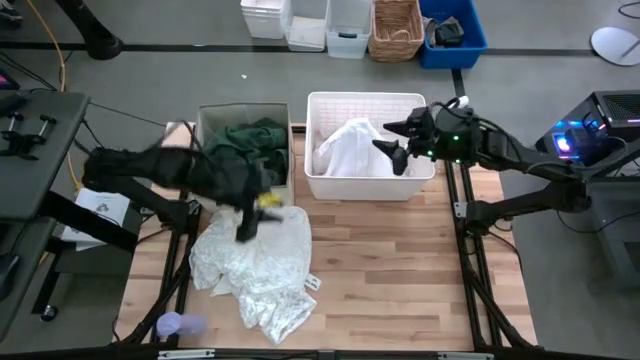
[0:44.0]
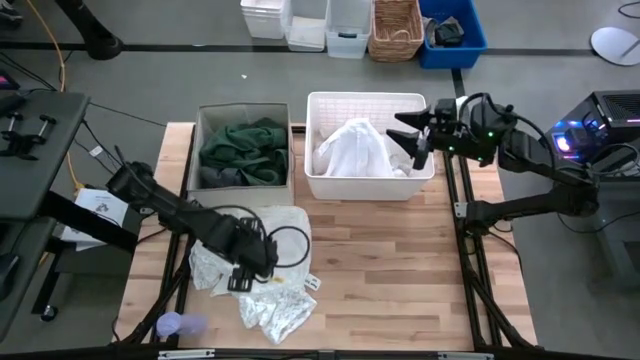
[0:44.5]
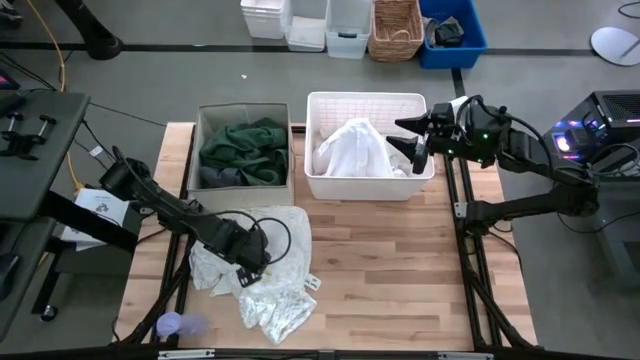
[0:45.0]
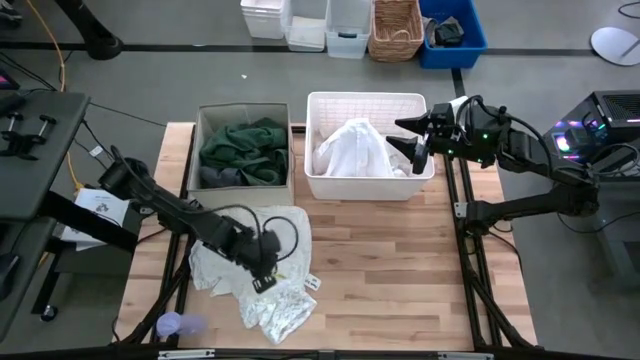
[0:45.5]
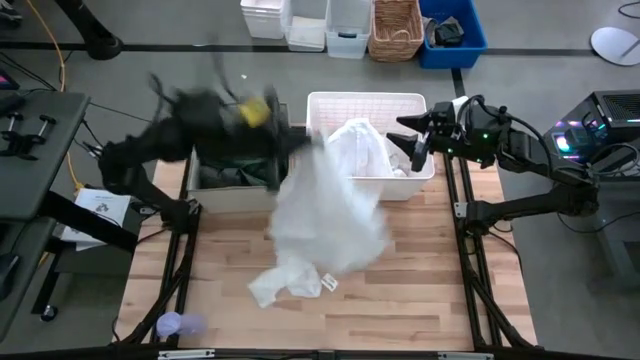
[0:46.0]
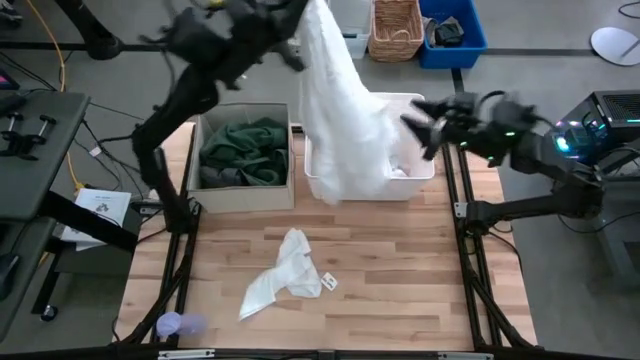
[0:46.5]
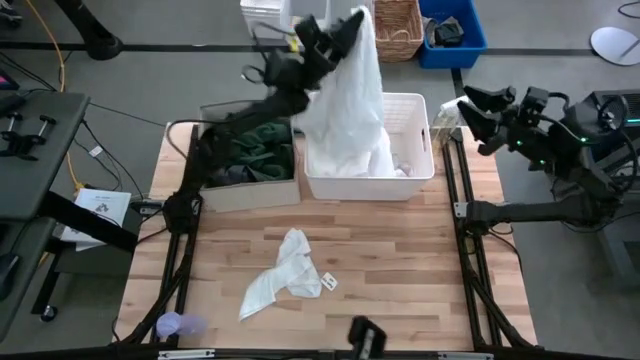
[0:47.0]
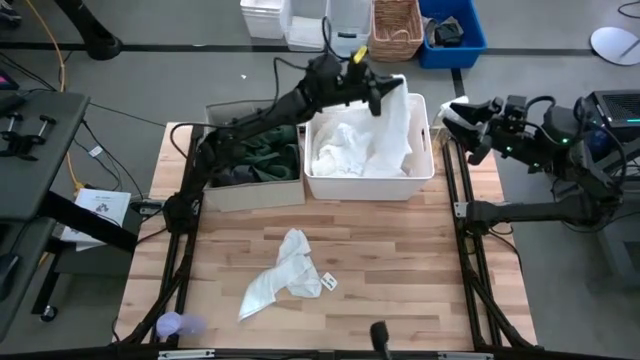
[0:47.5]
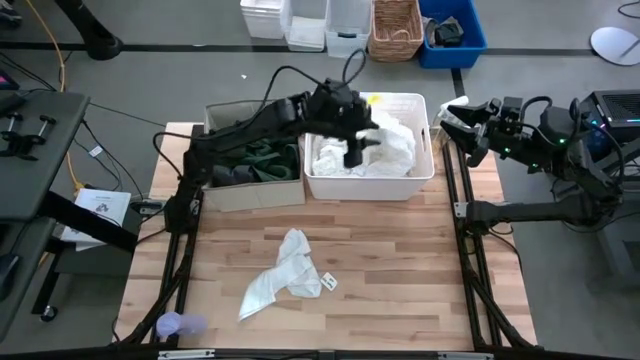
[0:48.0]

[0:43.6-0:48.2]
Task: Sort clothes
Put the white dress on the white basket

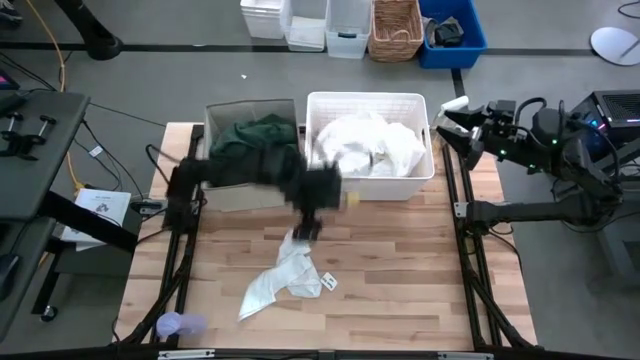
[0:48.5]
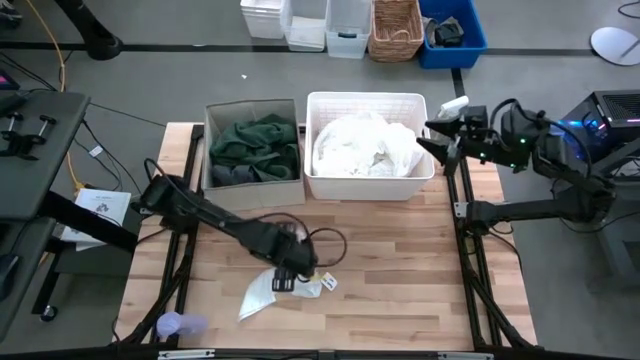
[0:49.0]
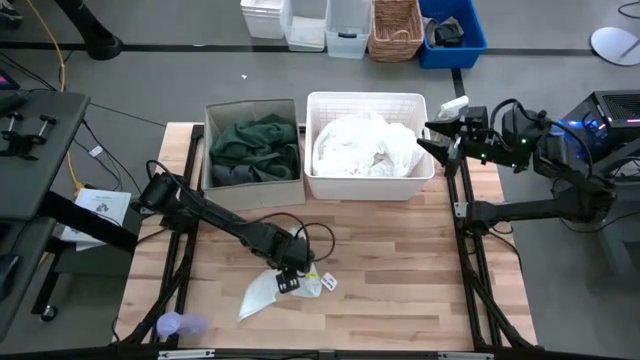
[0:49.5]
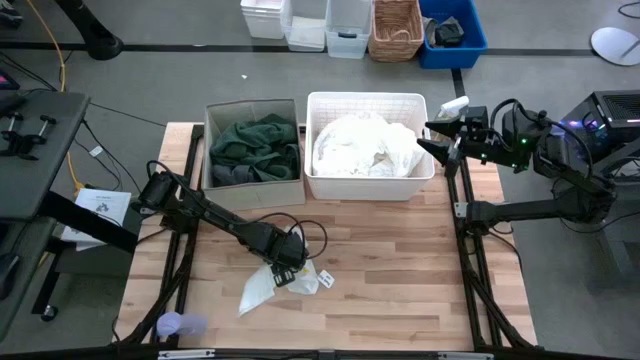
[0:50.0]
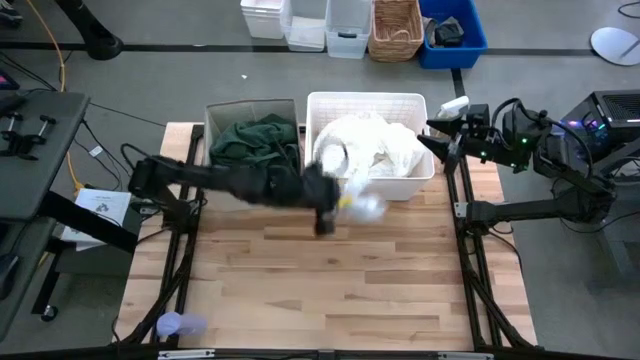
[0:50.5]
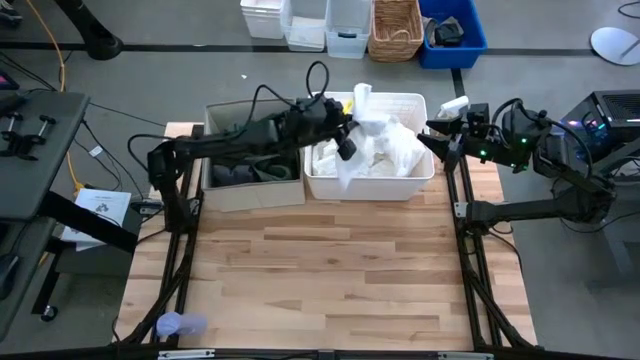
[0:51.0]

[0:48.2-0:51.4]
Put the white shorts on the white basket

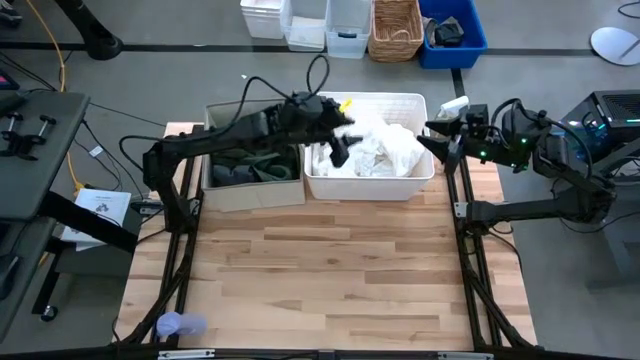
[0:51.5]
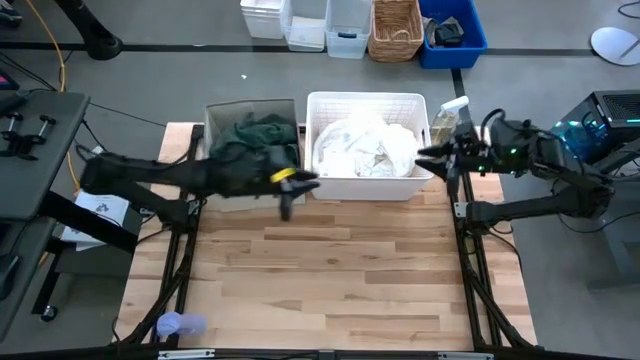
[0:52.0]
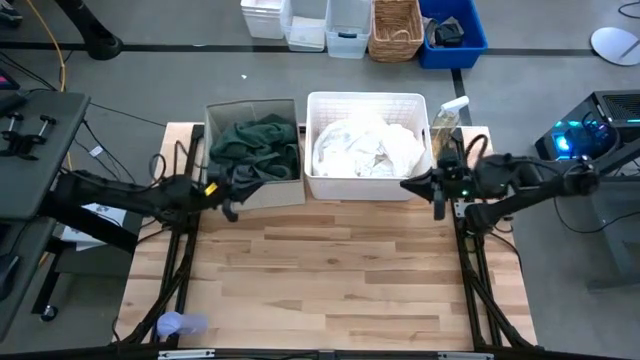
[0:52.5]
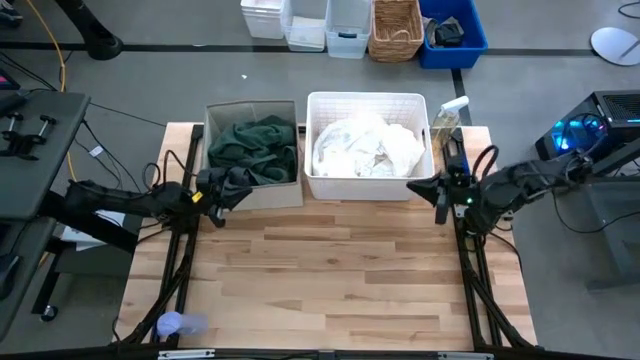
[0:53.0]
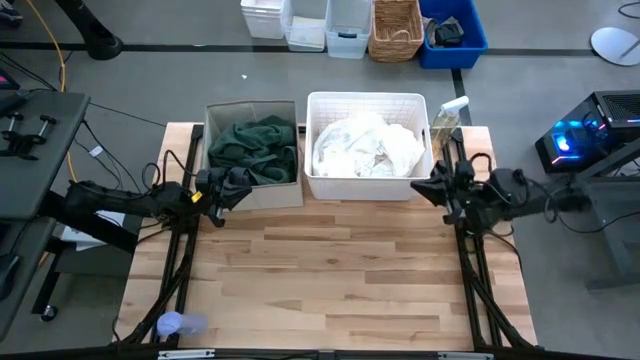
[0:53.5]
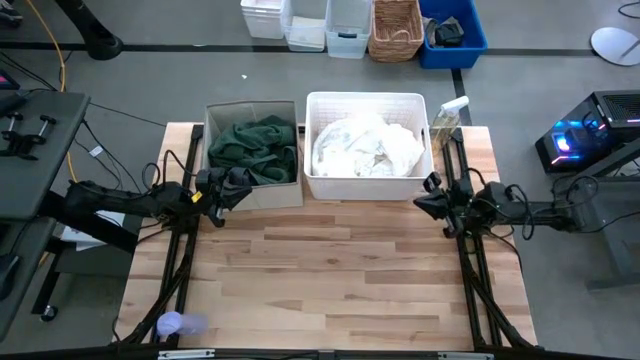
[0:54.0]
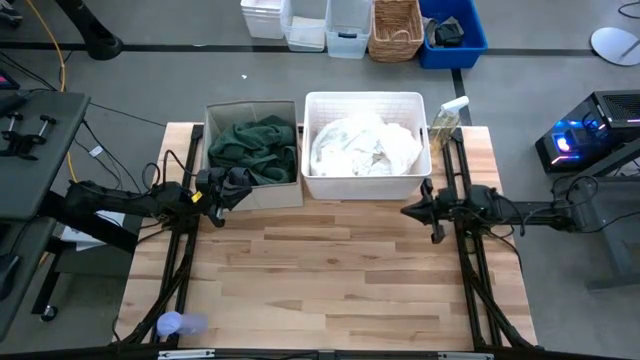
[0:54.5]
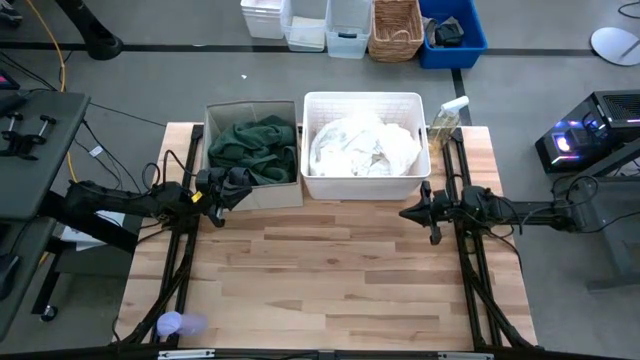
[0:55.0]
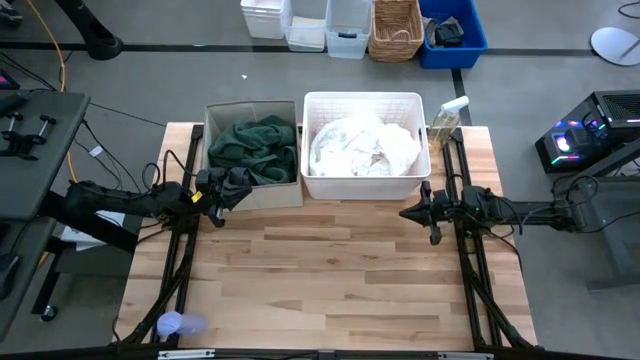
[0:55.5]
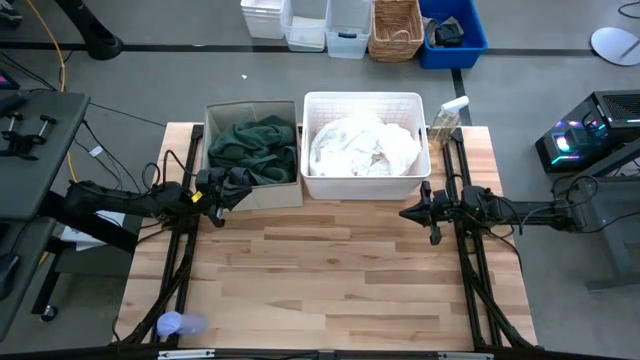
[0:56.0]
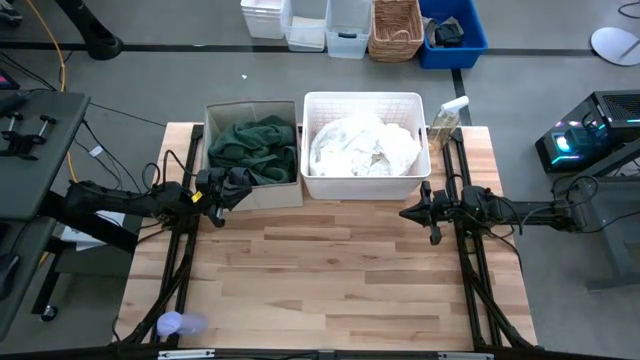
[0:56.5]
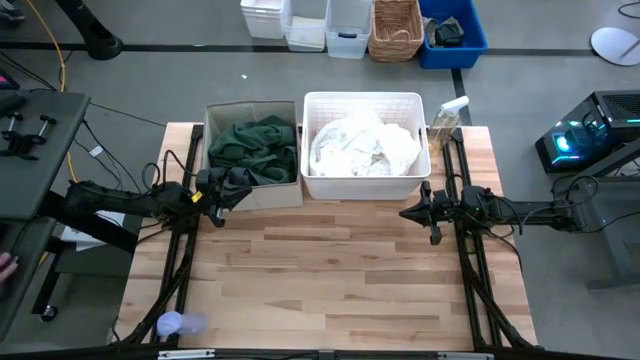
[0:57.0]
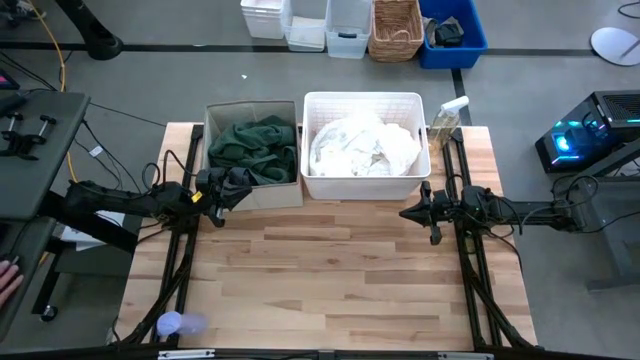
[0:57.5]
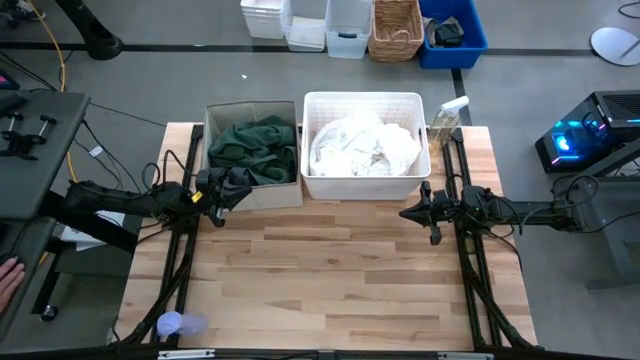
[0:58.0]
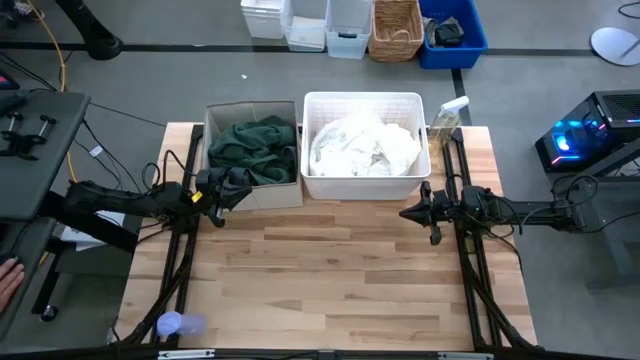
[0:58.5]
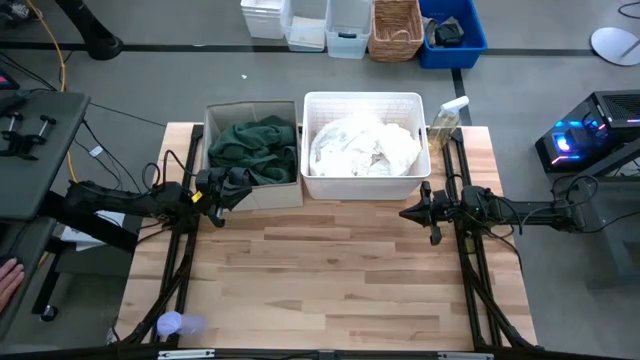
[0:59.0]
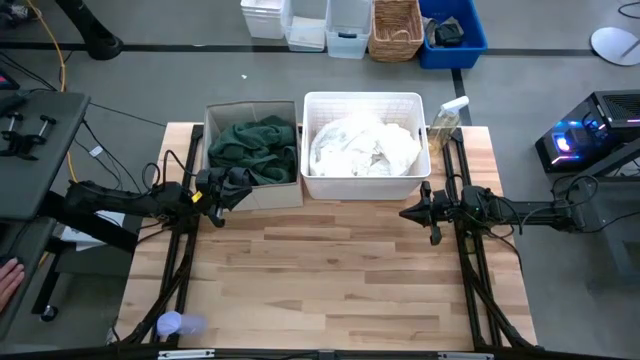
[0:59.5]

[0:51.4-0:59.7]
Return to Home Position

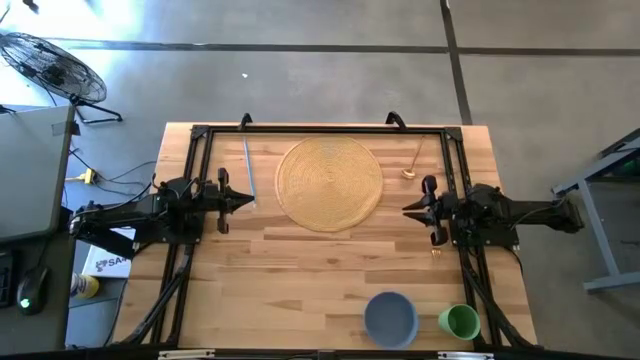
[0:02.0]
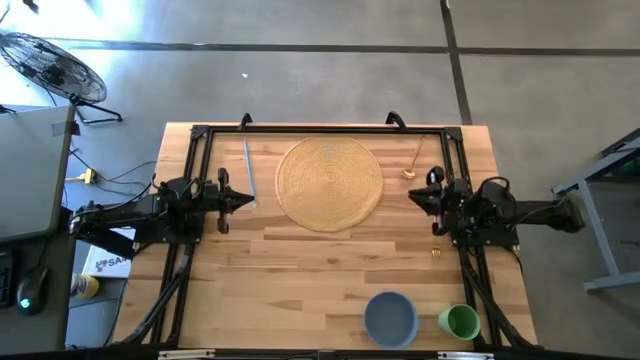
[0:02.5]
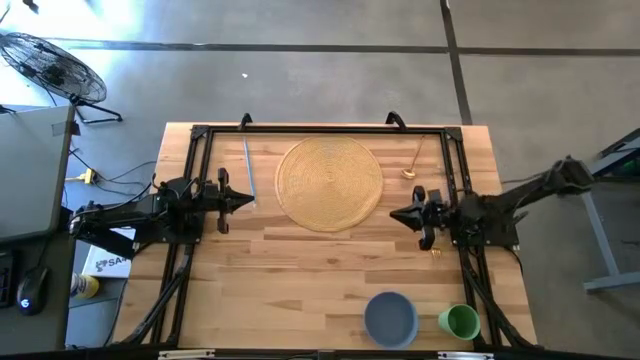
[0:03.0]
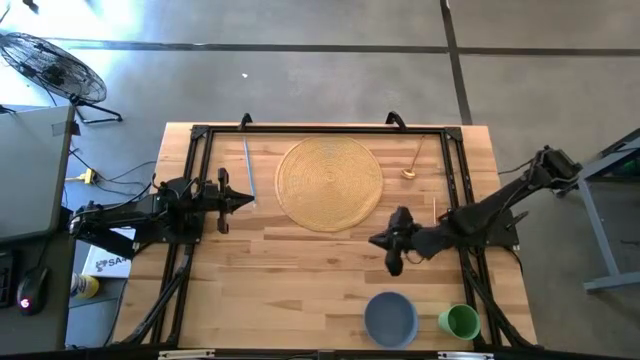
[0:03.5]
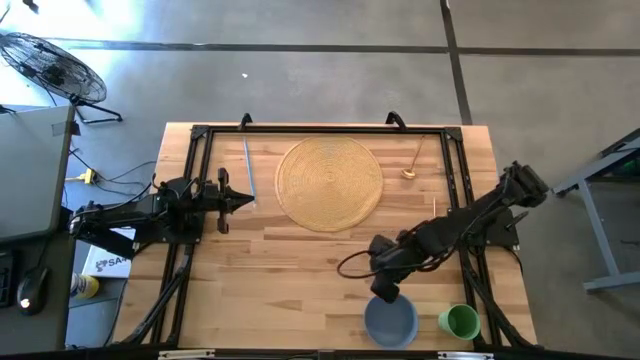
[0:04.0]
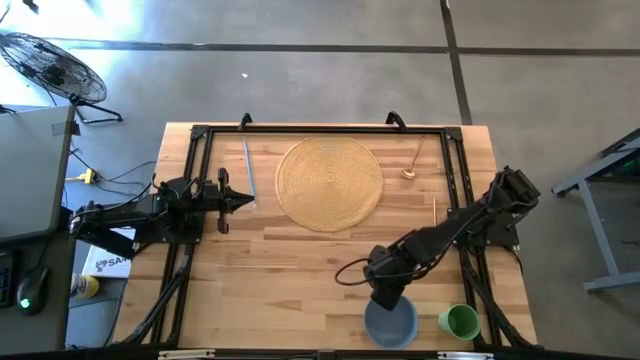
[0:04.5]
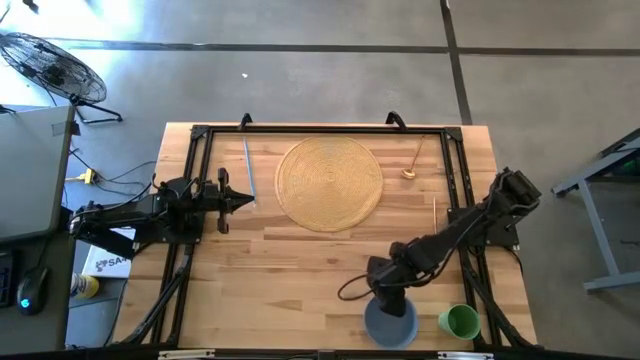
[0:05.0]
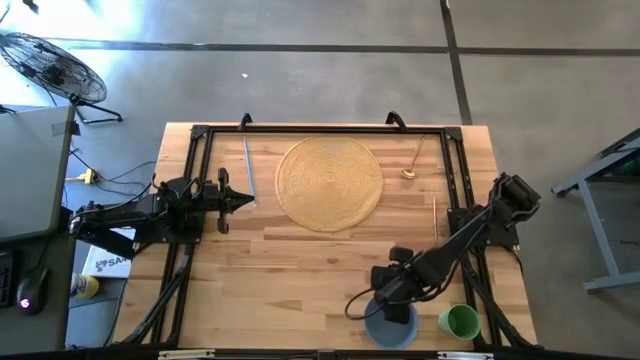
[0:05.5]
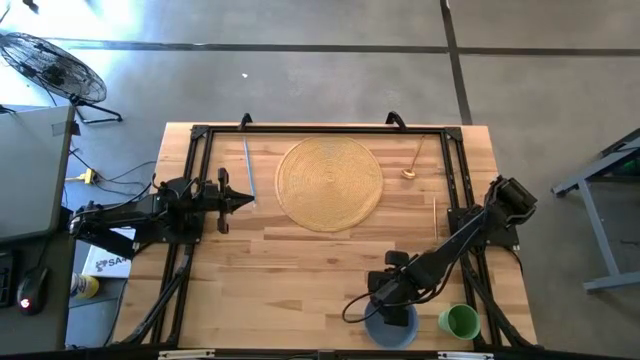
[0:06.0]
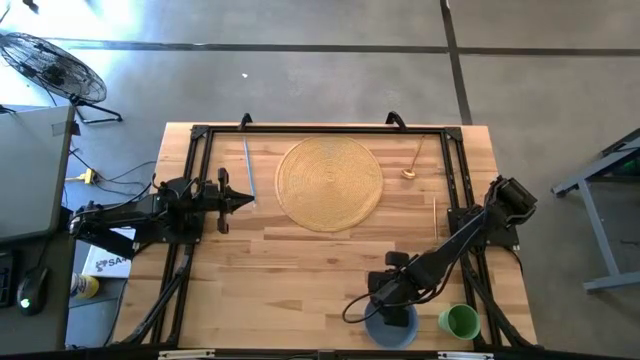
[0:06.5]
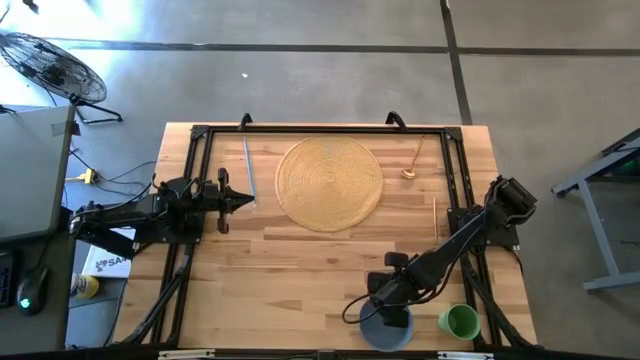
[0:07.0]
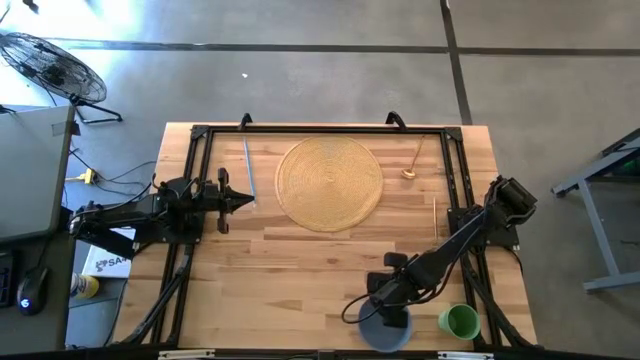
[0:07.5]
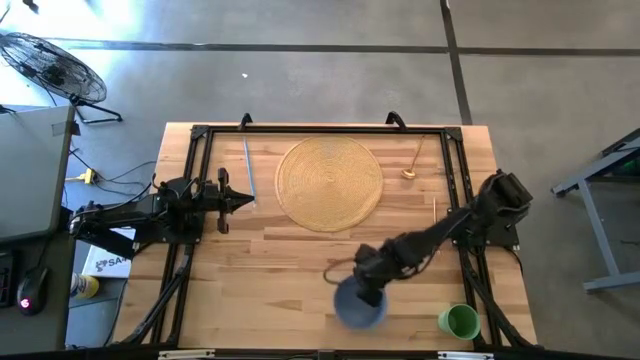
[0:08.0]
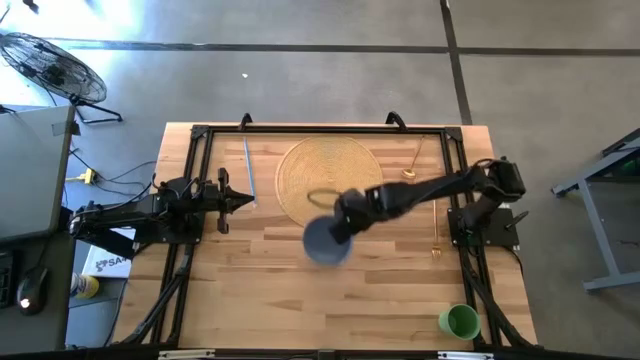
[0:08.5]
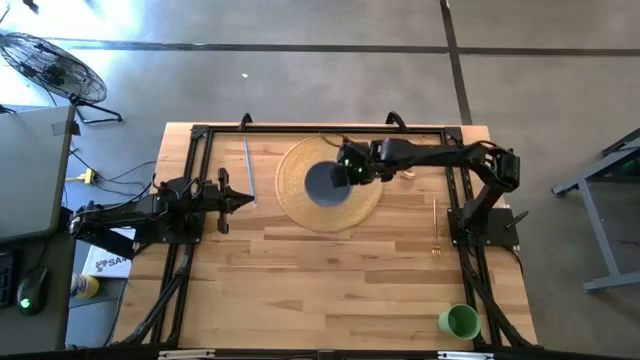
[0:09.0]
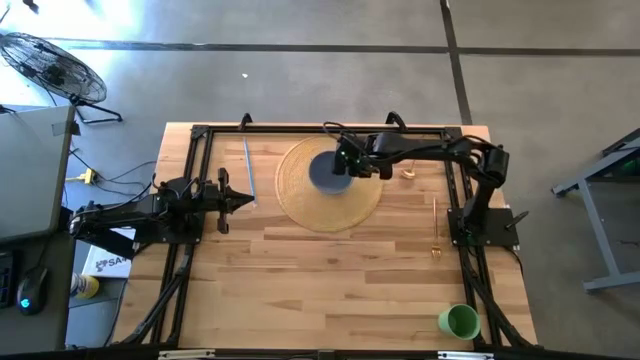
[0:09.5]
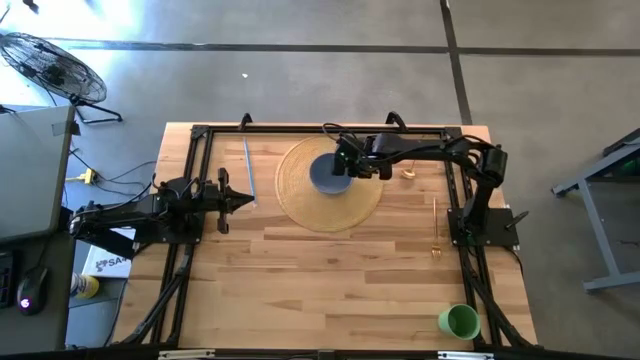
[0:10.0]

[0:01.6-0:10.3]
Task: Pick & Place Utensil
Put the blue bowl in the center of the brown mat
